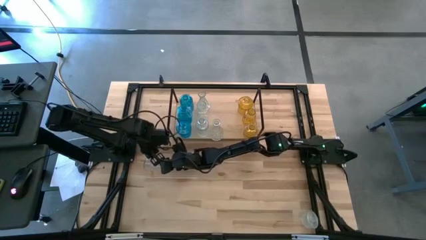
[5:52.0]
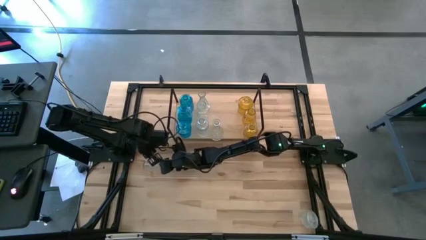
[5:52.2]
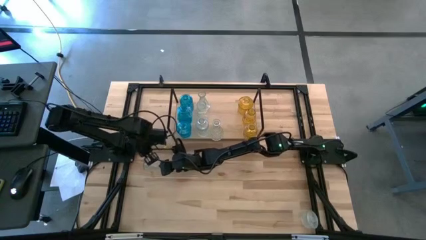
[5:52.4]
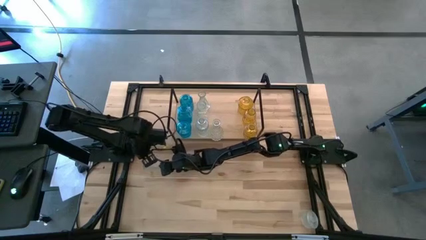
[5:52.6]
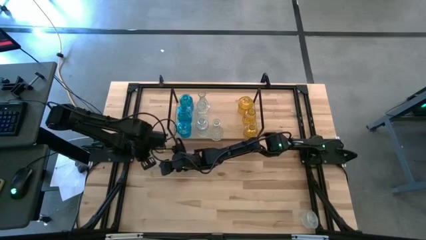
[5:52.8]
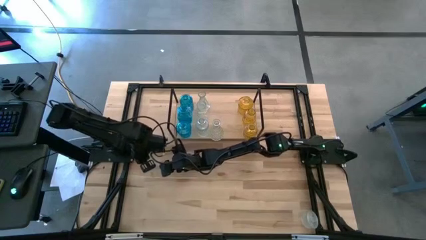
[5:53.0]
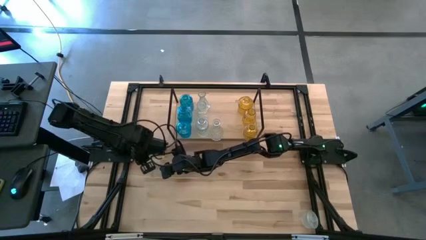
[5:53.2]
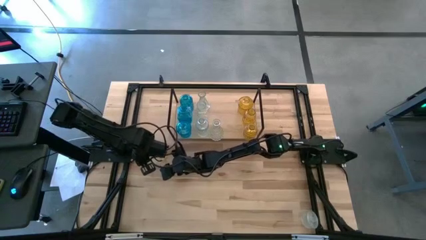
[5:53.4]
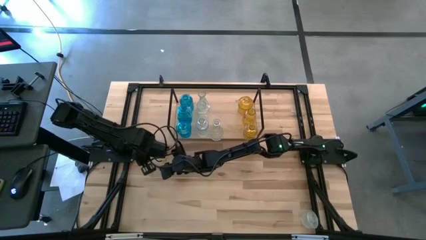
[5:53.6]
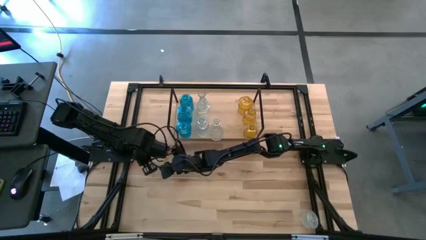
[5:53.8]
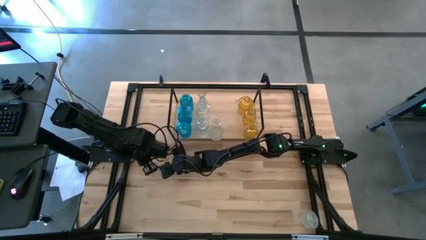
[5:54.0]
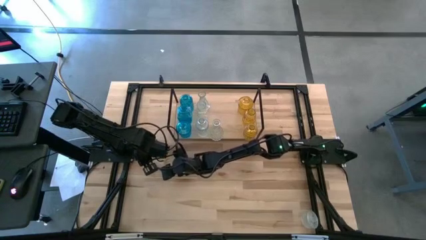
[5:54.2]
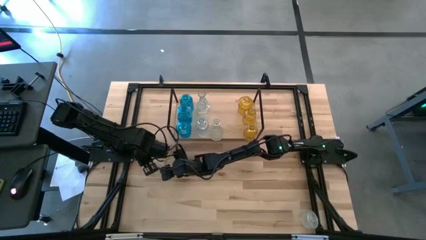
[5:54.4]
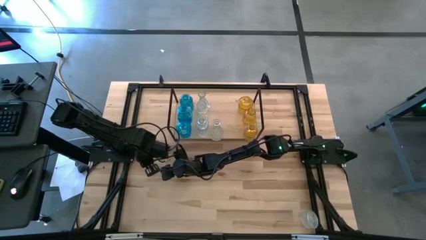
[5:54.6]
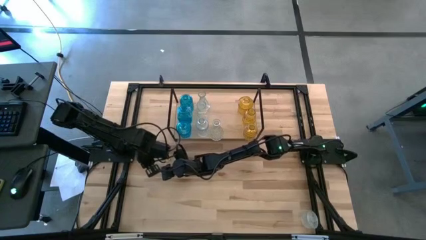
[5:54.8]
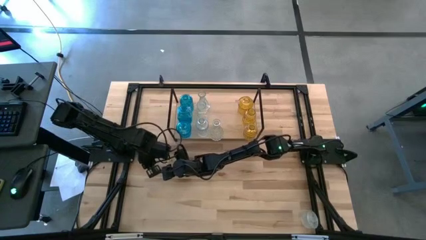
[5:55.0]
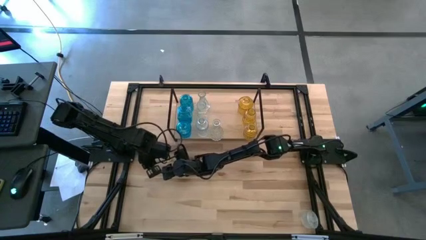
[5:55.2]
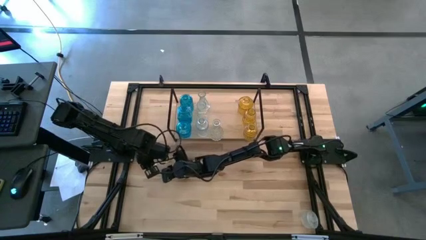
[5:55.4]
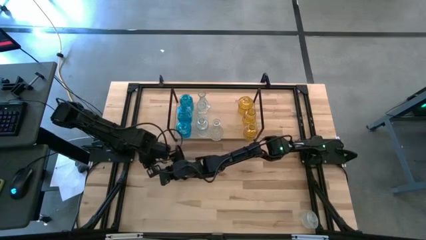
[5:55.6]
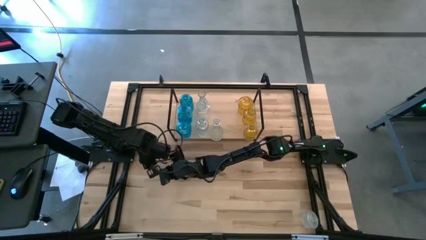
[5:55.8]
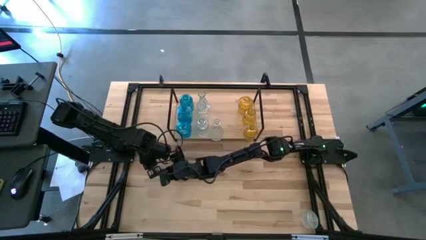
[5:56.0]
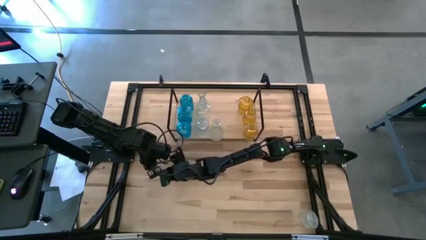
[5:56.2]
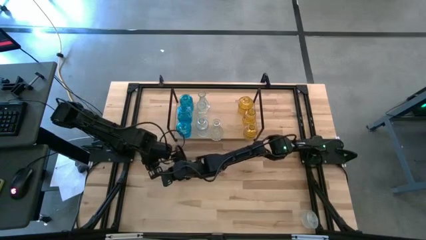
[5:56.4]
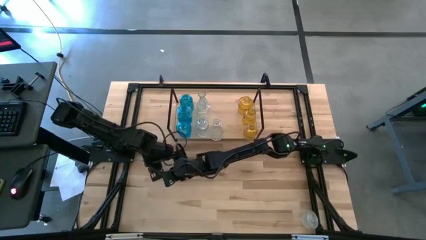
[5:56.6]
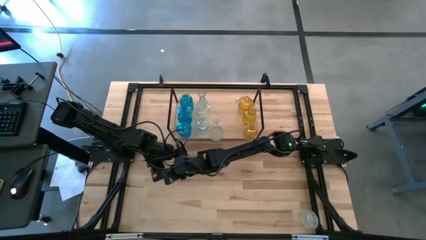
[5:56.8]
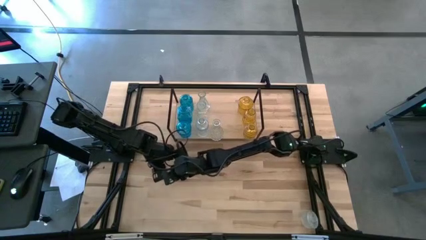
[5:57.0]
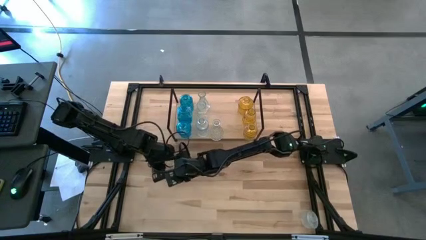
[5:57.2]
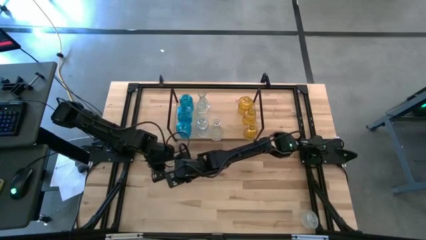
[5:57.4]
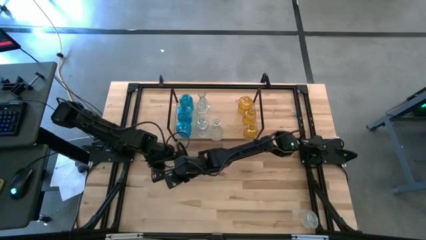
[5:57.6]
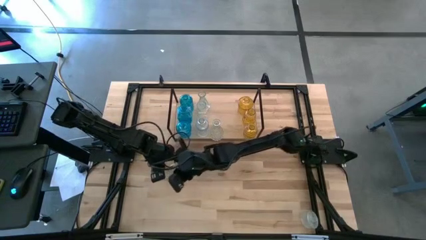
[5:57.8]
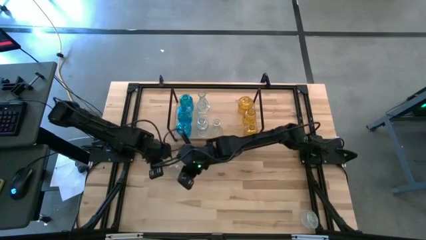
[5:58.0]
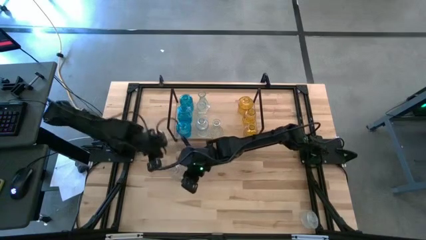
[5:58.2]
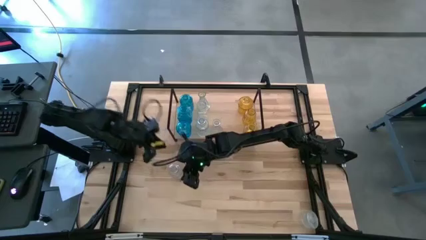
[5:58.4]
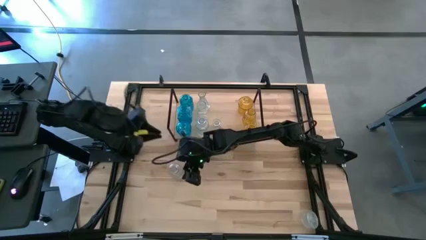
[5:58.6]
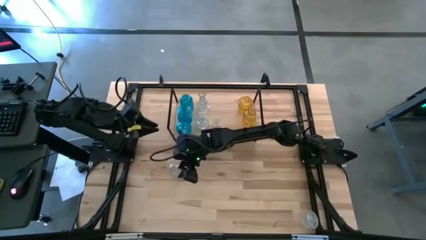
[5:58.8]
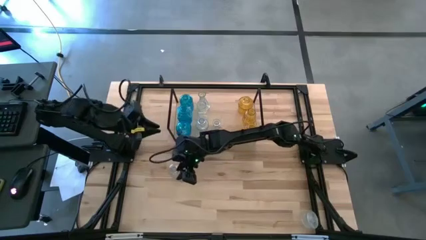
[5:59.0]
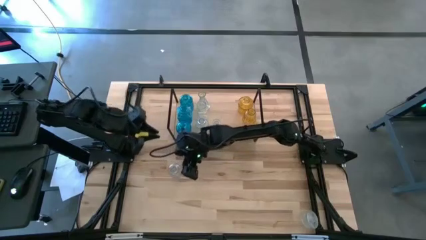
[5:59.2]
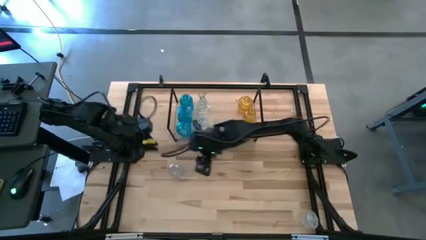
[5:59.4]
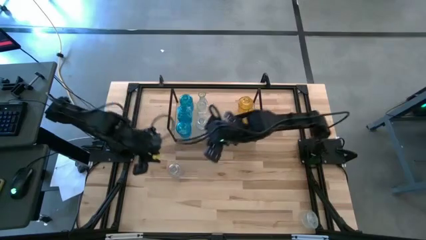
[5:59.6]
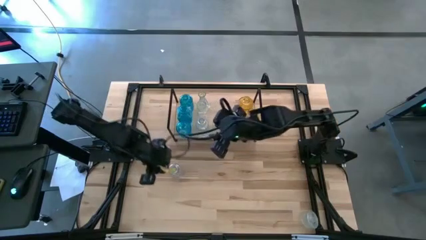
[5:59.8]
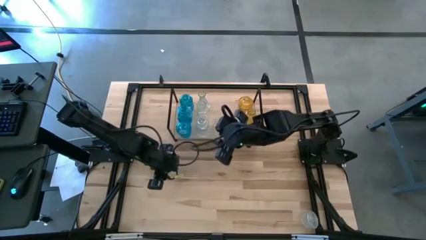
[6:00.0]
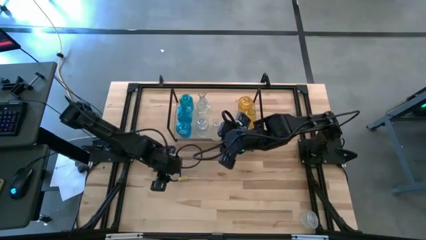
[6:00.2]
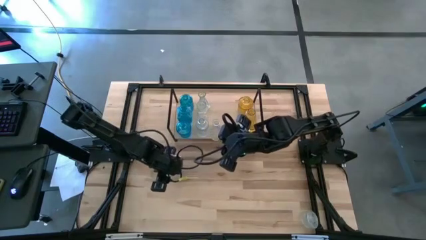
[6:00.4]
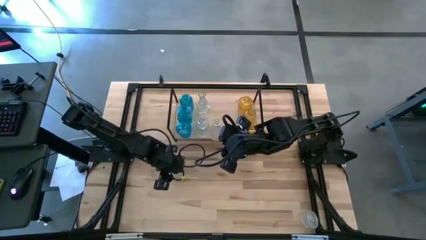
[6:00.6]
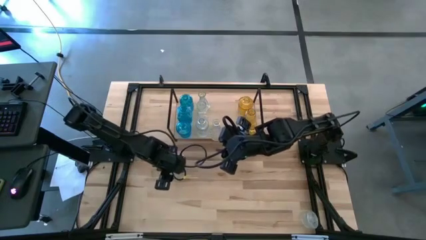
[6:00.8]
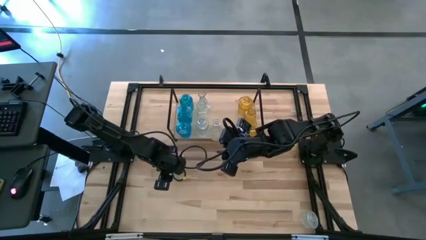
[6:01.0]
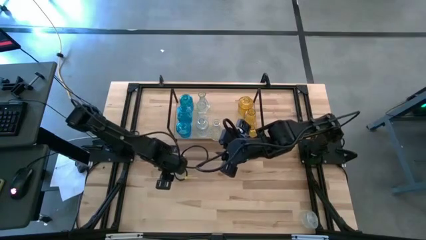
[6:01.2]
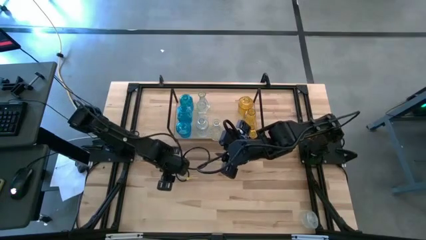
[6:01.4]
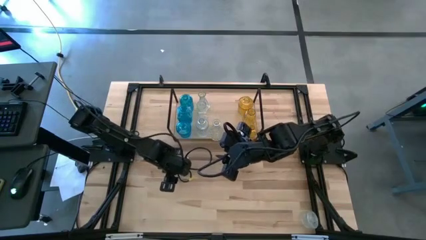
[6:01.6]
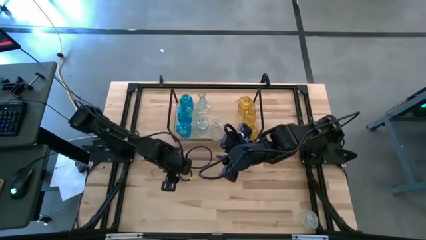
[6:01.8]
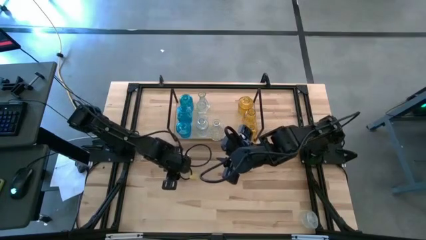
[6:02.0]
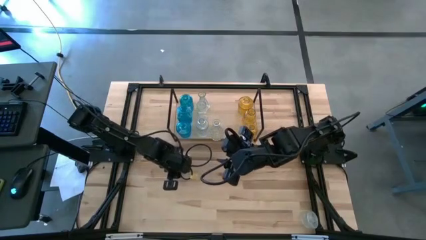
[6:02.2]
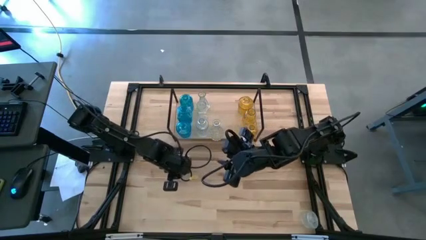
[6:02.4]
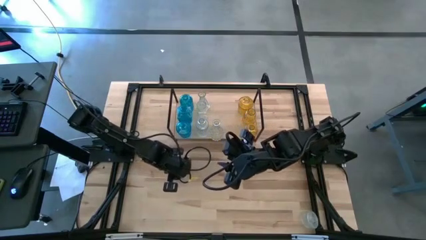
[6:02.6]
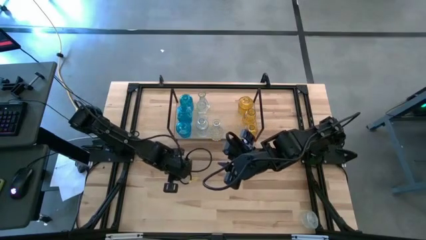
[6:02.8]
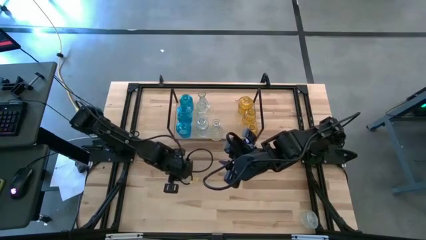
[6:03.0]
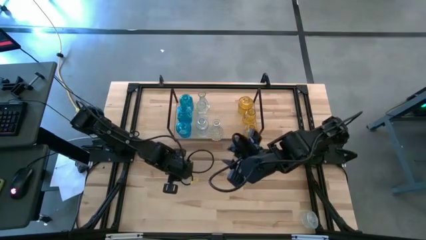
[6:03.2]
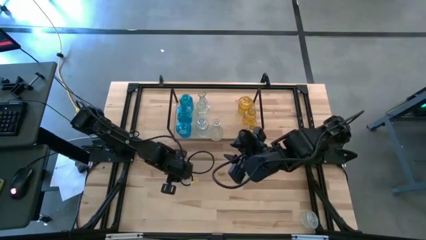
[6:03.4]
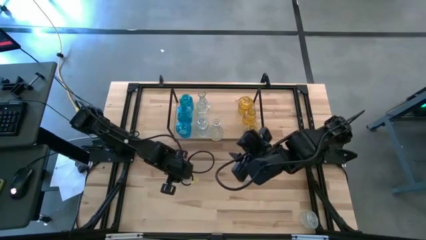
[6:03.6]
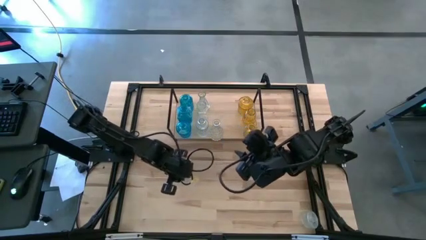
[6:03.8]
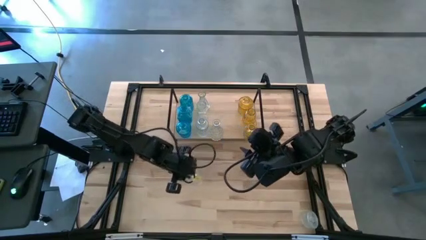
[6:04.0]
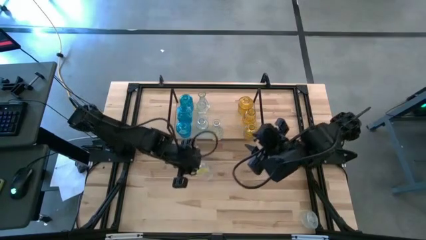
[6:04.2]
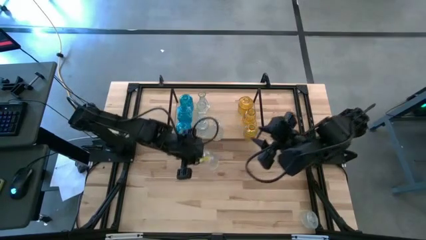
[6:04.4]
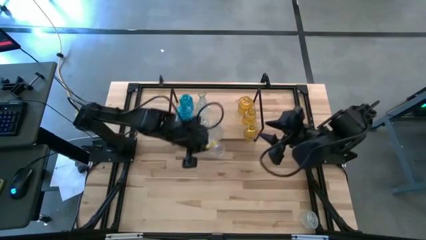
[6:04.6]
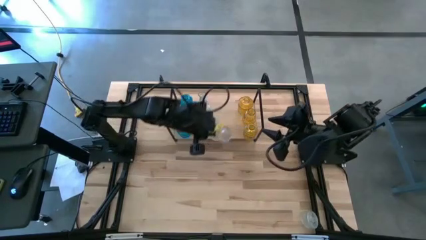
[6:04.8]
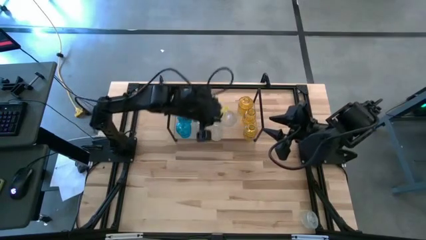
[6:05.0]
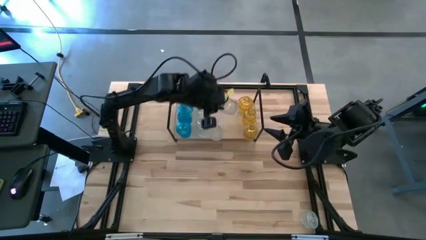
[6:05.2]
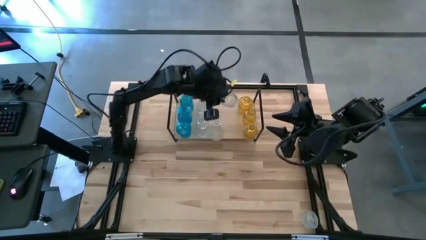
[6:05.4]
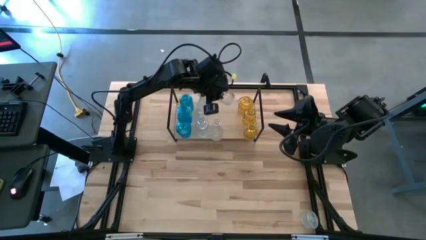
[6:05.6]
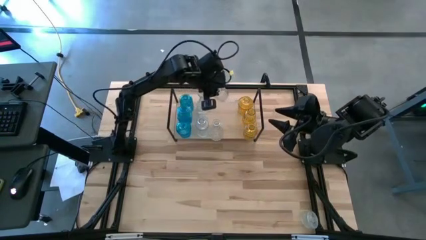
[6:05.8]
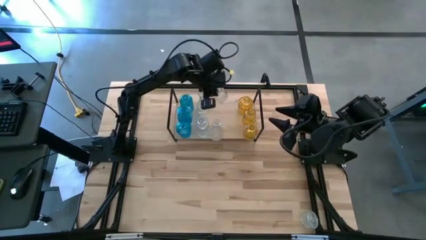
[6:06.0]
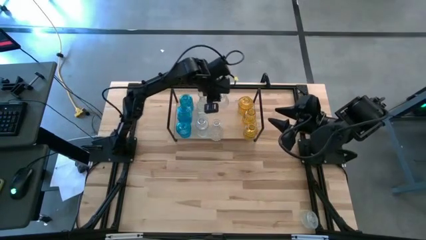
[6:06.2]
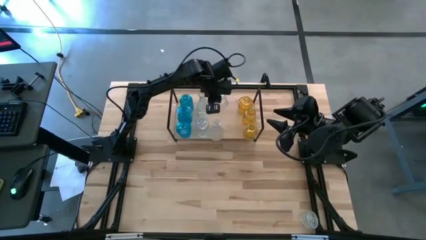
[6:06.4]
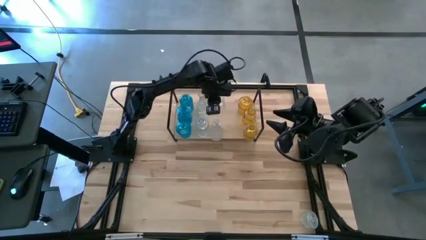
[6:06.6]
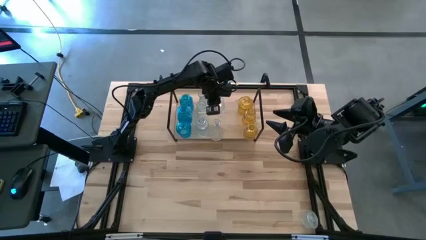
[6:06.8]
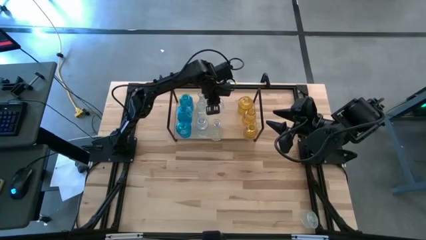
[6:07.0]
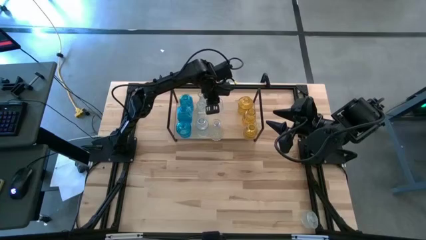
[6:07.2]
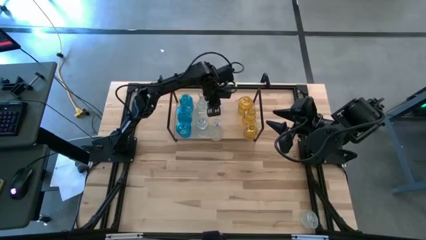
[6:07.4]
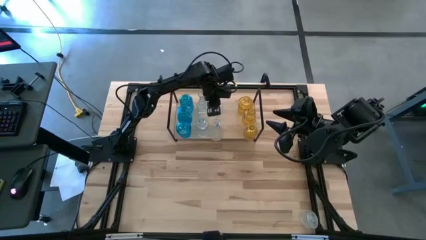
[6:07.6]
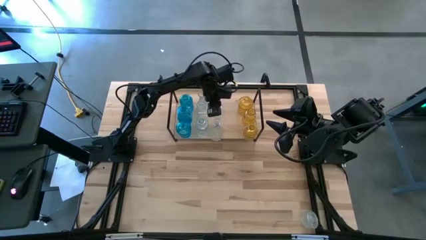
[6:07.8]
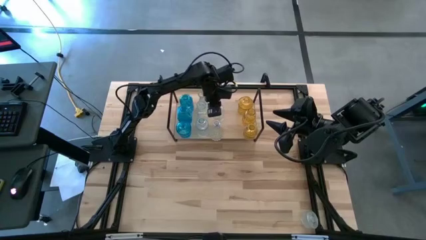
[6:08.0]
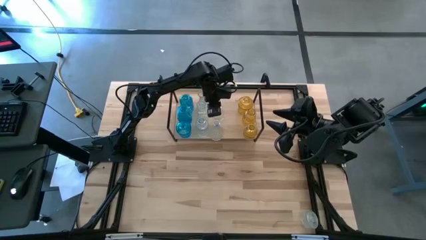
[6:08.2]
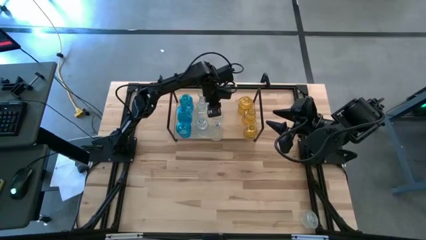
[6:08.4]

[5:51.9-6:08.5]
Task: sort vases onto shelf
Put the transparent vase on the shelf aligned with the other transparent vase
